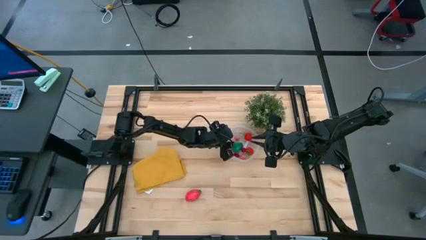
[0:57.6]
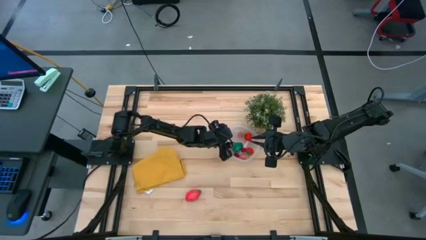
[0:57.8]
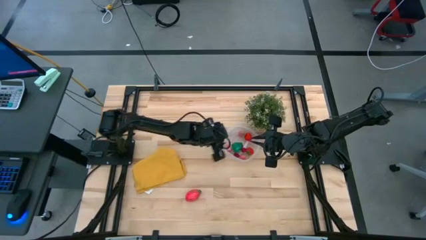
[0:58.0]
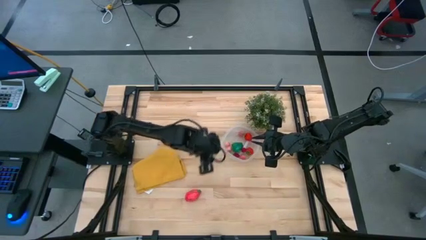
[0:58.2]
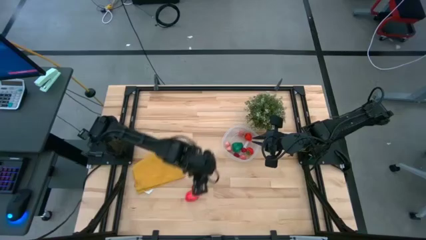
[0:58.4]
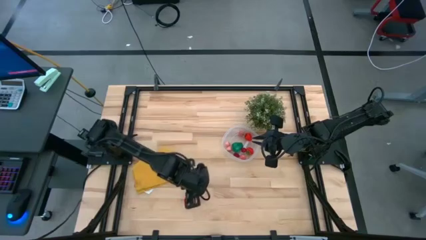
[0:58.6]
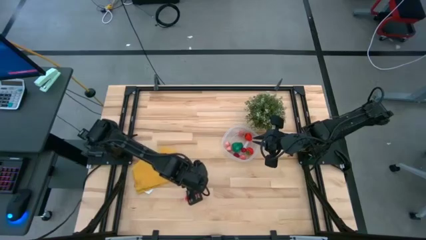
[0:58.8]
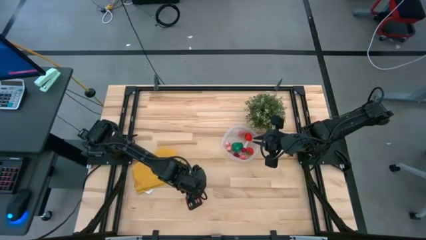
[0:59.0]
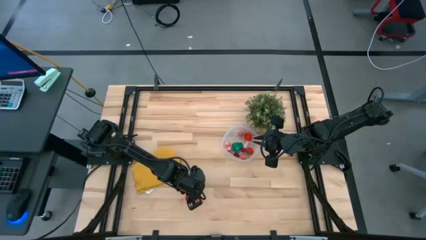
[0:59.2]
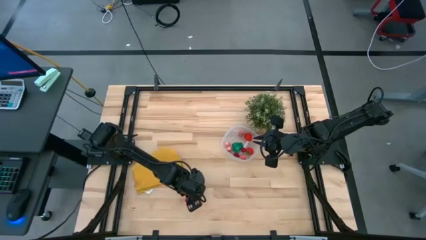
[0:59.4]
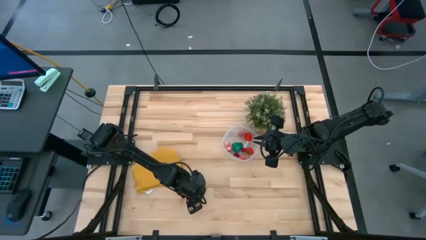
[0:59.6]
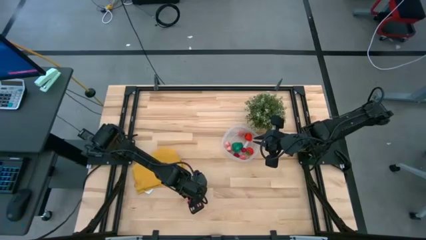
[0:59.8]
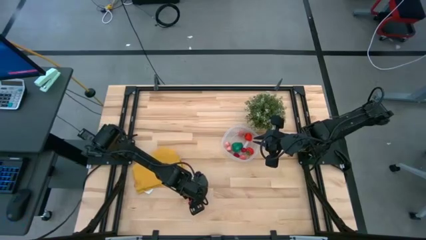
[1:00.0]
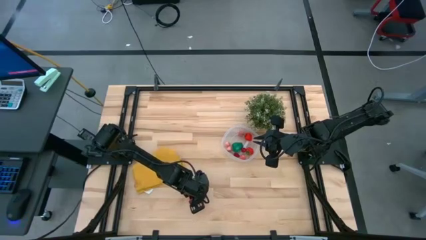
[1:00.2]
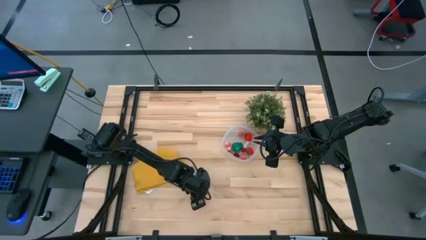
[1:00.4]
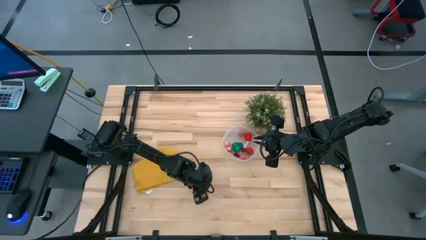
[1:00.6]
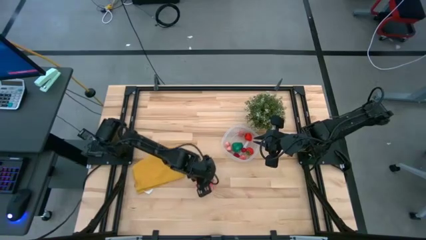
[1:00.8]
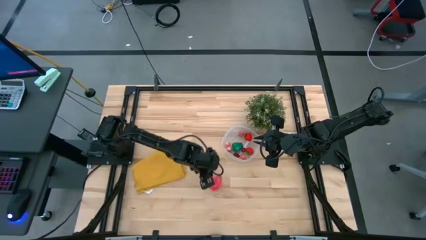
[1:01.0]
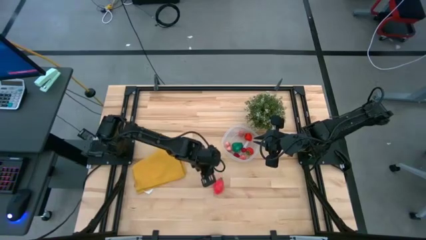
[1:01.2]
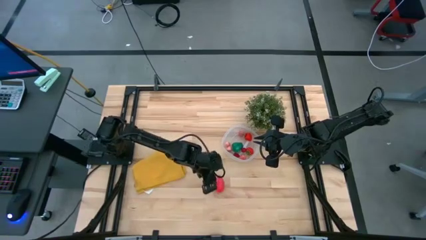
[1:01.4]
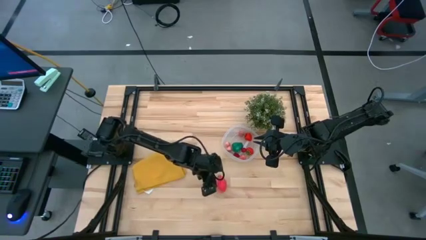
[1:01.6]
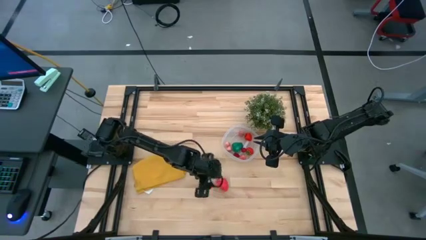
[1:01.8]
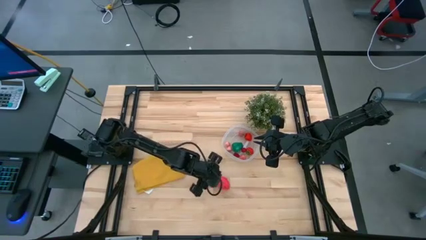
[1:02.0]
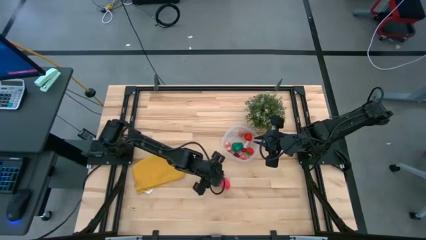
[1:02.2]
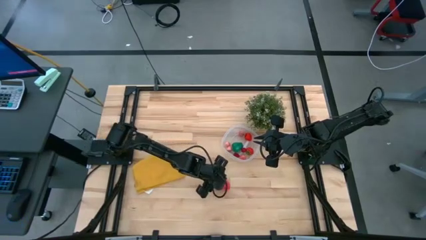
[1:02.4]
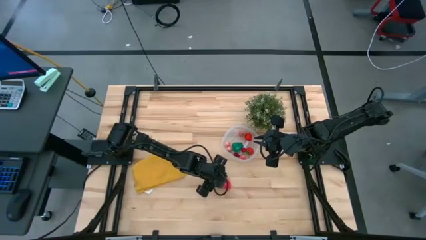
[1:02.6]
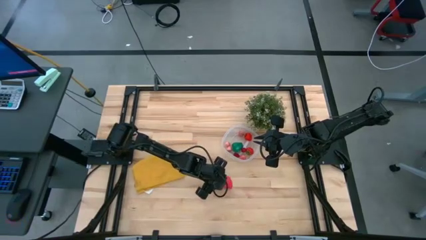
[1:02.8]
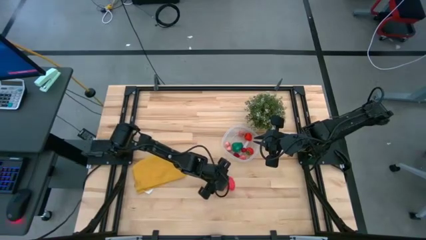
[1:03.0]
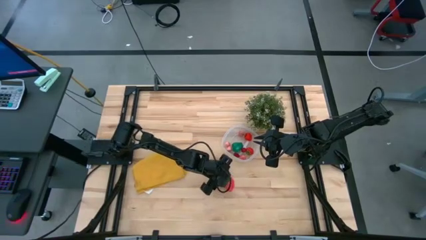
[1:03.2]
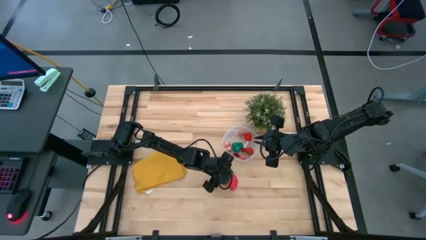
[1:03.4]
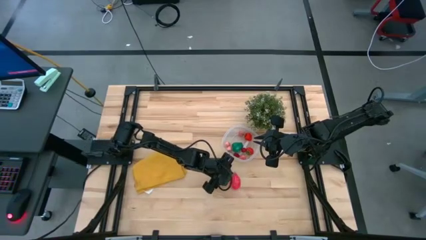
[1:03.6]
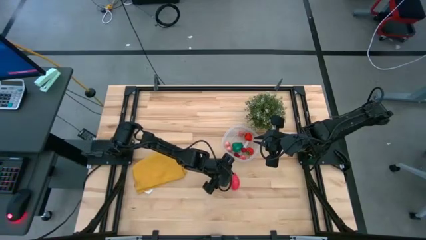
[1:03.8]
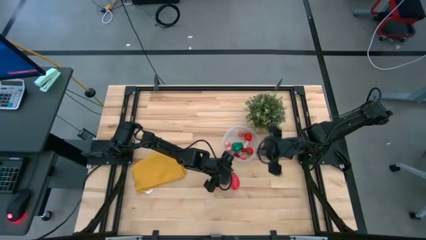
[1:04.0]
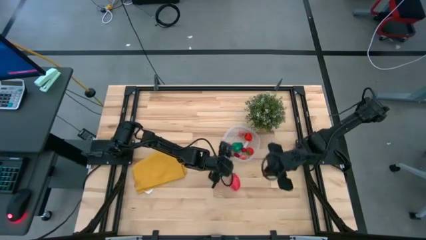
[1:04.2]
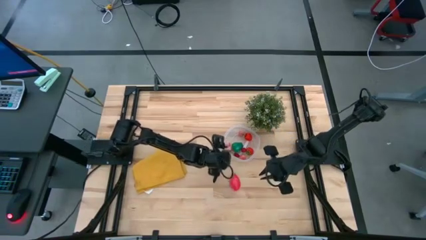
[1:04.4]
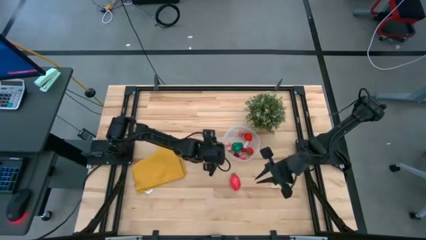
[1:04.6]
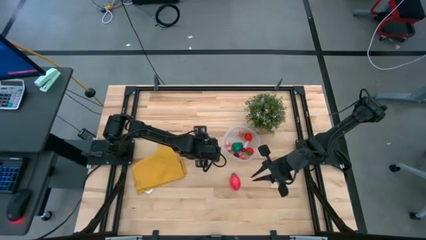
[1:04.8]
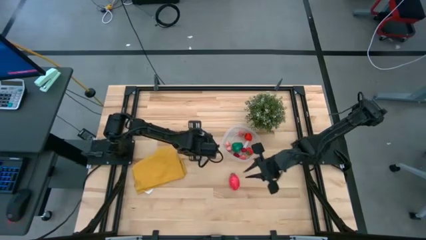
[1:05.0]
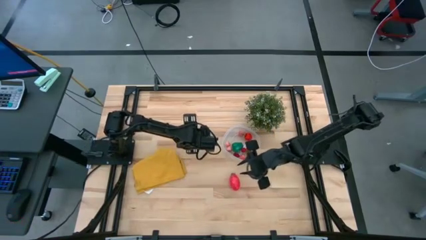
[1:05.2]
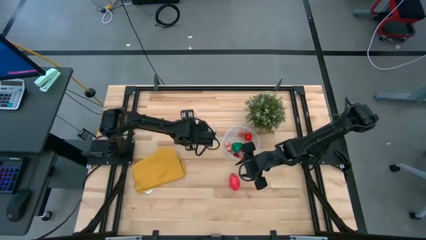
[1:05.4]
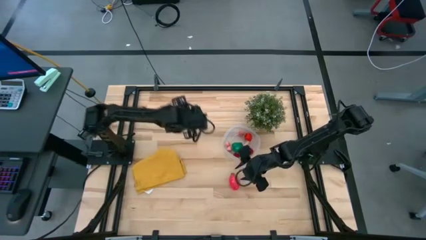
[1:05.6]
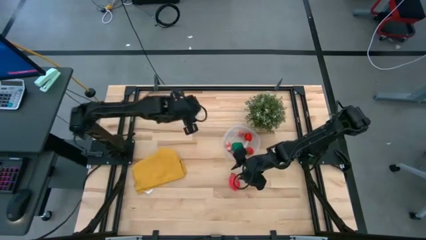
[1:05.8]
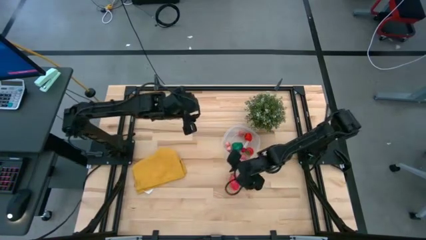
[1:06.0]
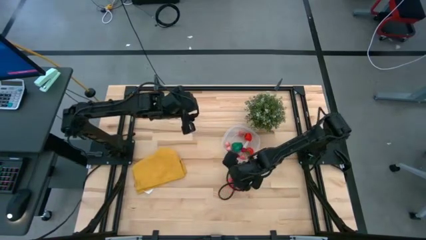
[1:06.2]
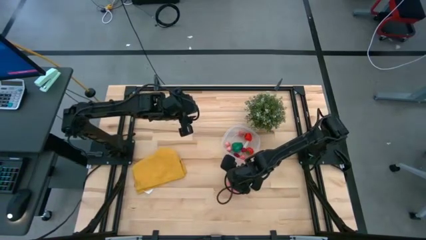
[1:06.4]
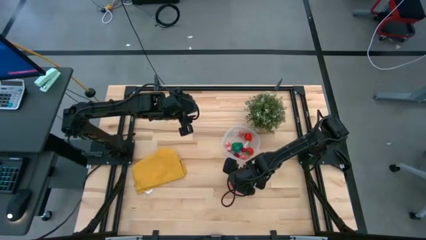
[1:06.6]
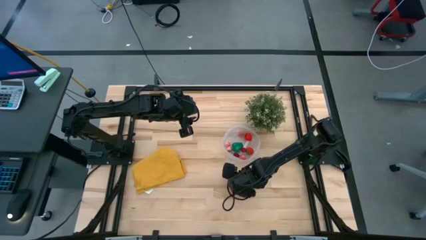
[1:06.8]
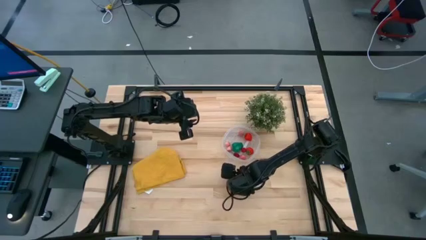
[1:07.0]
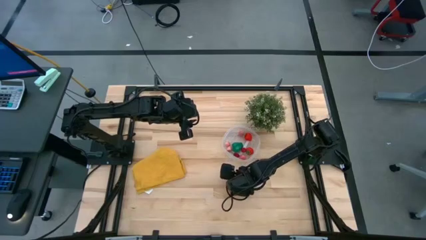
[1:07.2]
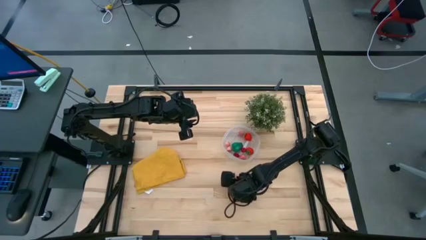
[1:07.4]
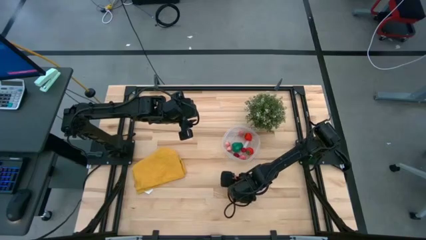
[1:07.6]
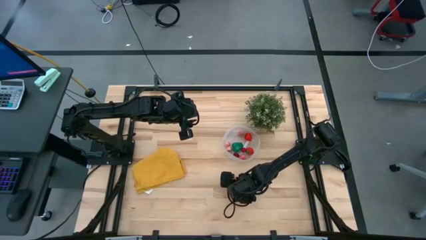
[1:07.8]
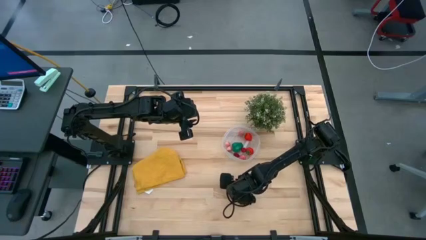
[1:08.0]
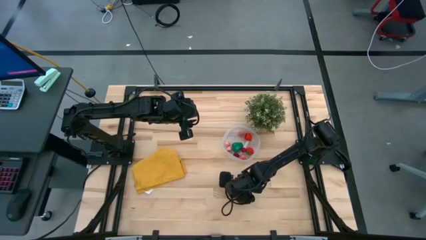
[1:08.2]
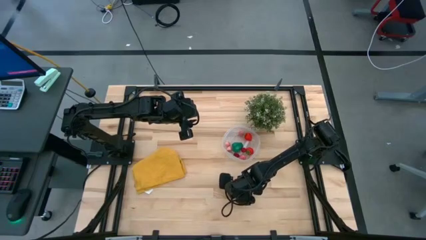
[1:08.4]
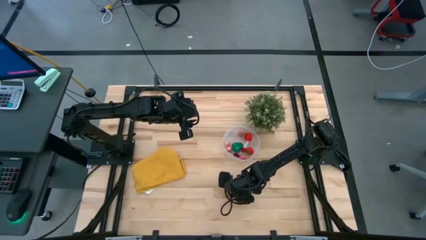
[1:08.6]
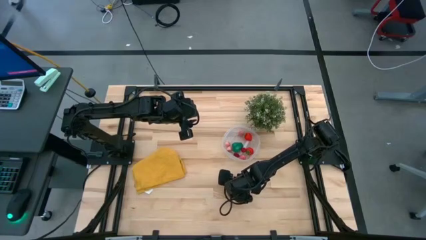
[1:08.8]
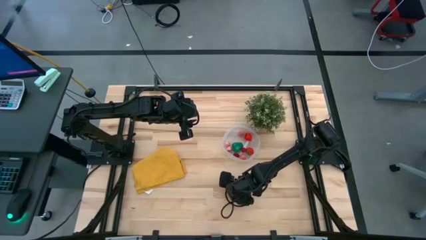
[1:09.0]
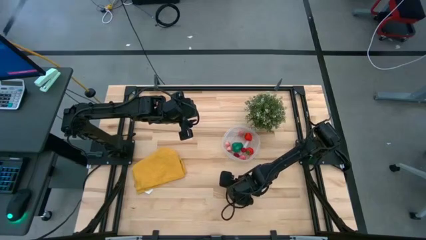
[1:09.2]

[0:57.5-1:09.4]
Task: Pick and placing Produce into tupperware
Put the dragon fruit into the transparent bin

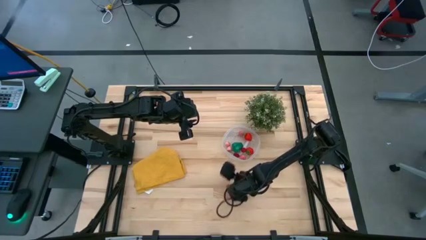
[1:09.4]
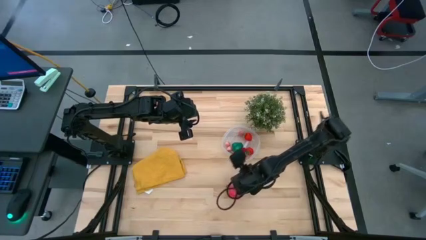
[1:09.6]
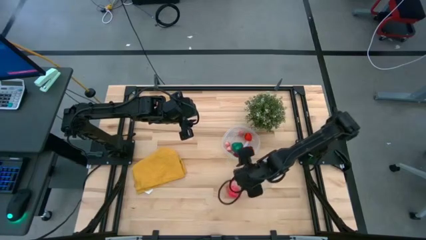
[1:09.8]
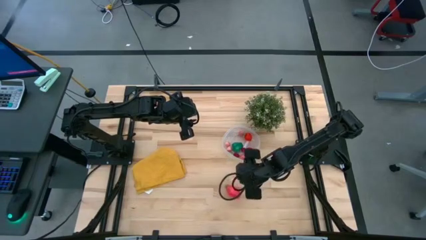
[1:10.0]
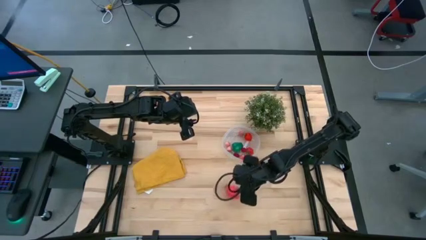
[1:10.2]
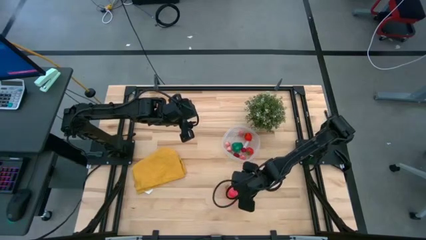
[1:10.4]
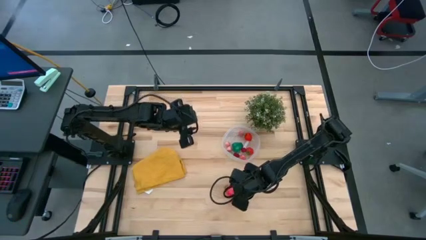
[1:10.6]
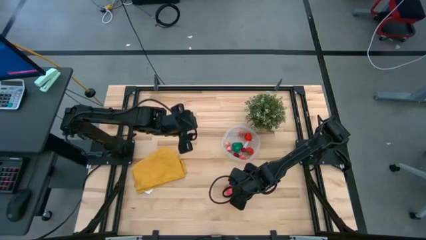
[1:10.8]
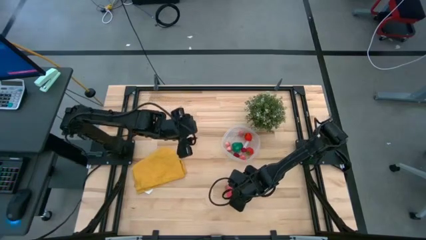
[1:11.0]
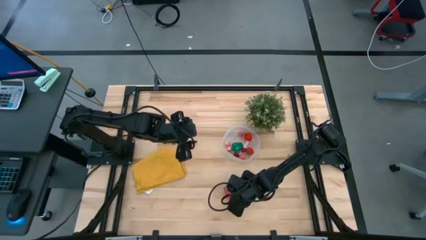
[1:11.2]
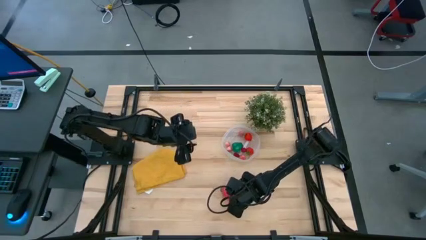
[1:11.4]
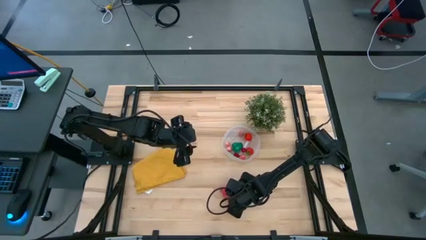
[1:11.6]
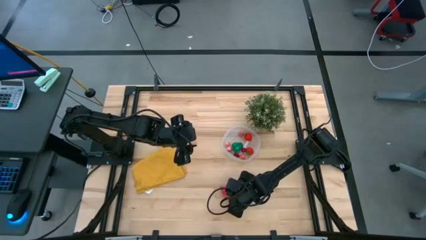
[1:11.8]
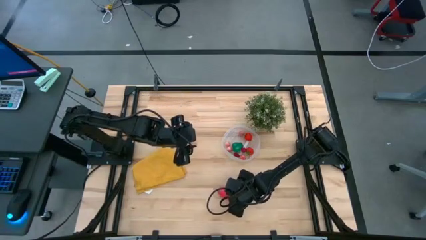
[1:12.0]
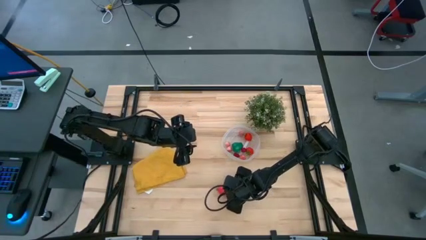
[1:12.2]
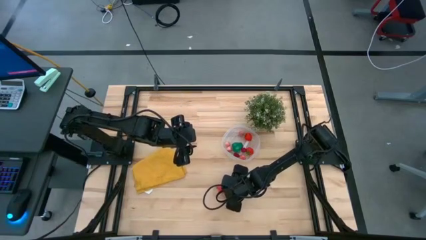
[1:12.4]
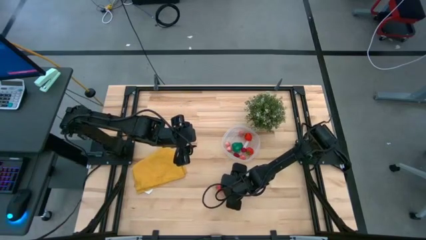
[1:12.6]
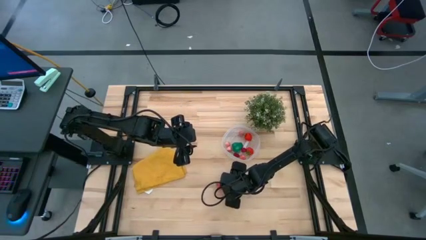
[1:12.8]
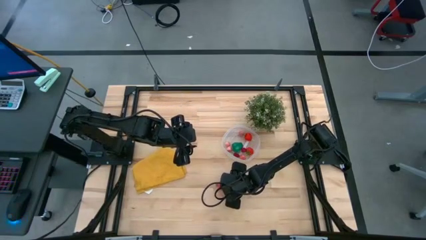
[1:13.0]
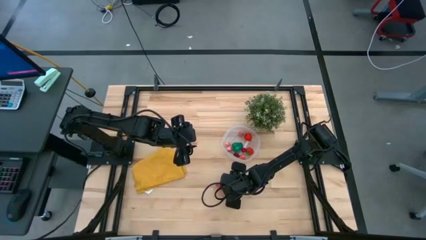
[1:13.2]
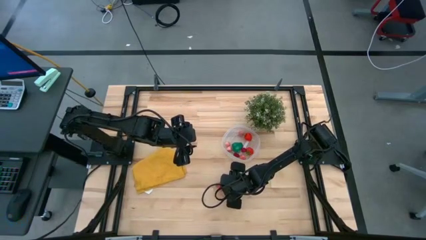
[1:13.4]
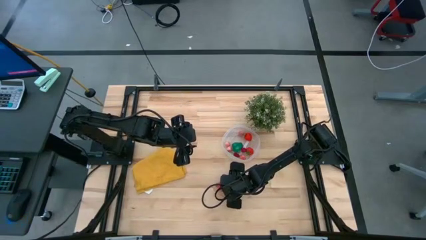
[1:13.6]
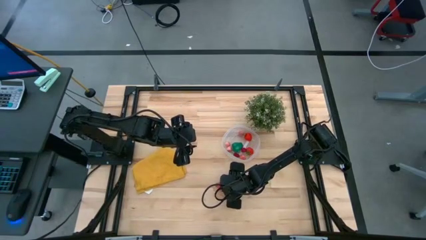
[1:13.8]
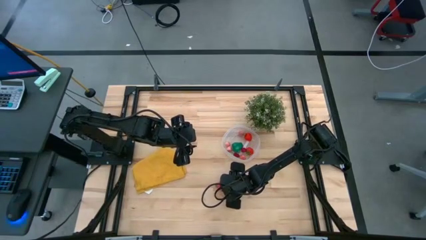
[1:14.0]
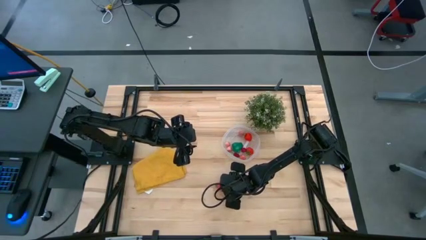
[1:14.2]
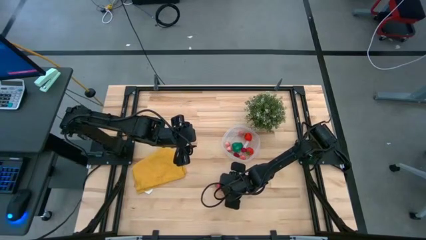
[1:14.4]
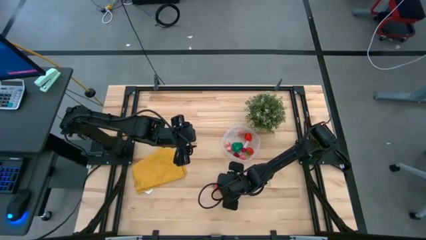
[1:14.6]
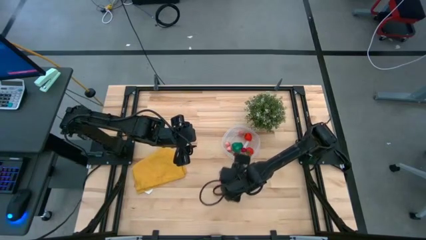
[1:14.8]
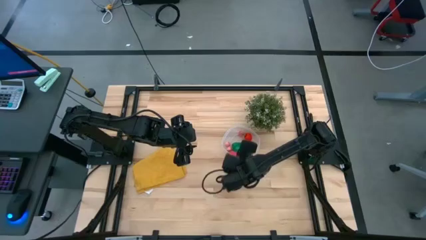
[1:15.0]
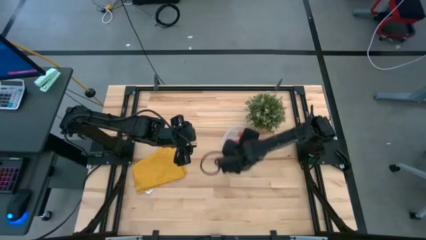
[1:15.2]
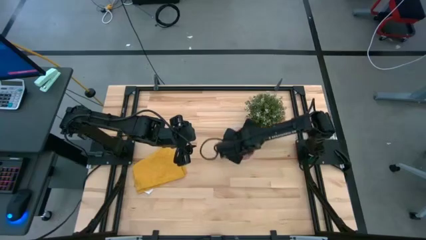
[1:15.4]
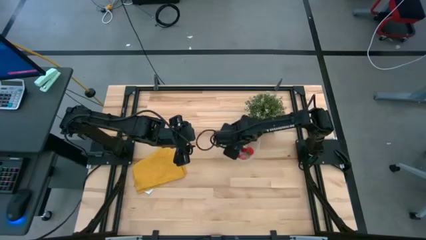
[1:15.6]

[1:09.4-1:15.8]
Put the dragon fruit into the transparent bin
